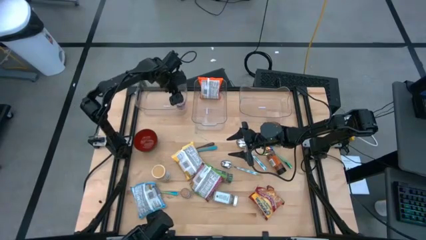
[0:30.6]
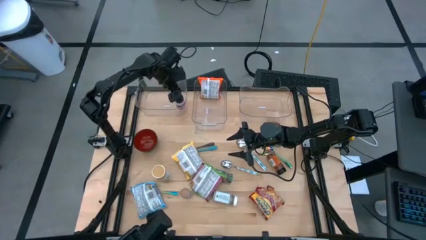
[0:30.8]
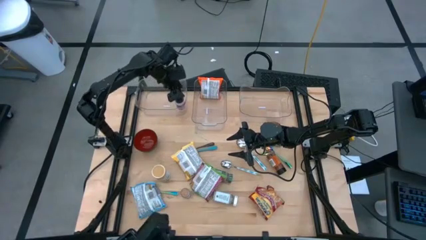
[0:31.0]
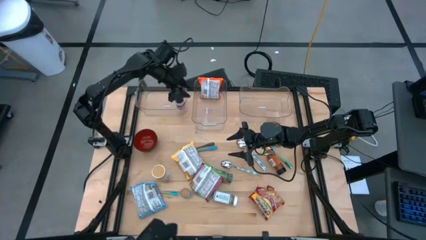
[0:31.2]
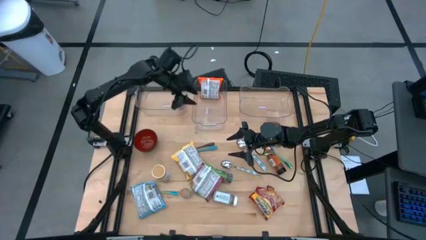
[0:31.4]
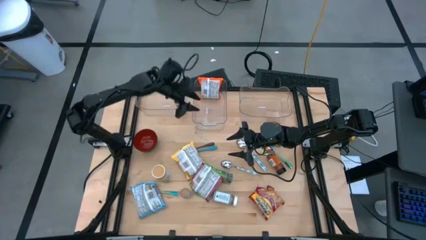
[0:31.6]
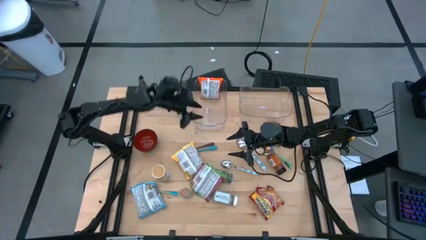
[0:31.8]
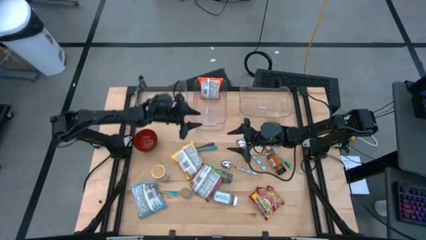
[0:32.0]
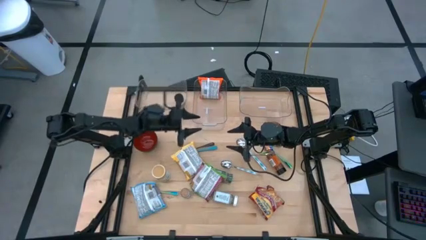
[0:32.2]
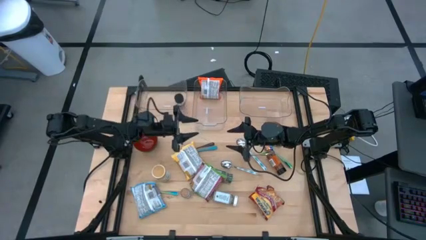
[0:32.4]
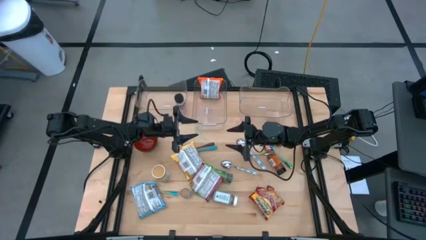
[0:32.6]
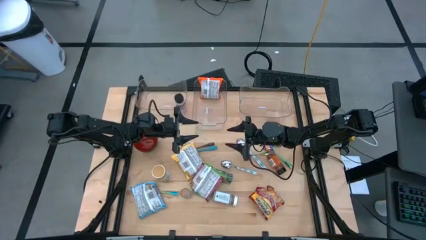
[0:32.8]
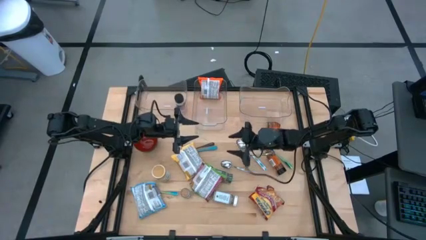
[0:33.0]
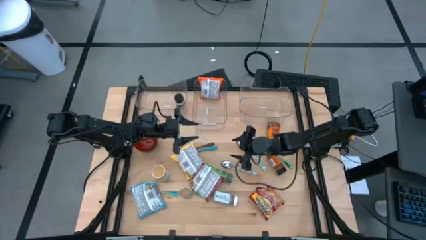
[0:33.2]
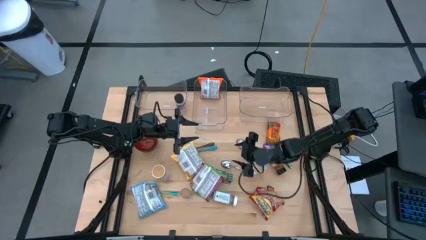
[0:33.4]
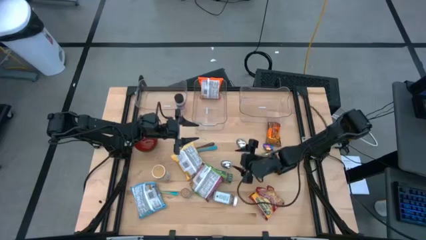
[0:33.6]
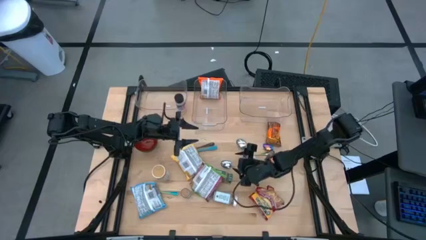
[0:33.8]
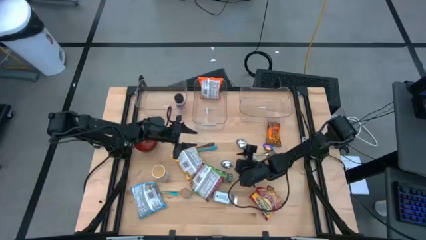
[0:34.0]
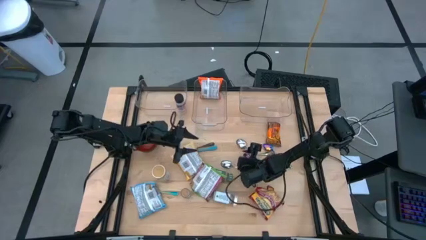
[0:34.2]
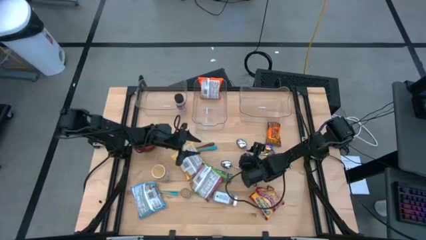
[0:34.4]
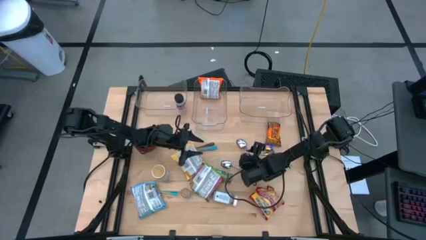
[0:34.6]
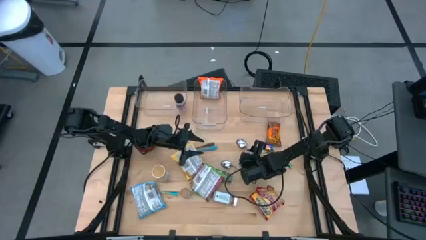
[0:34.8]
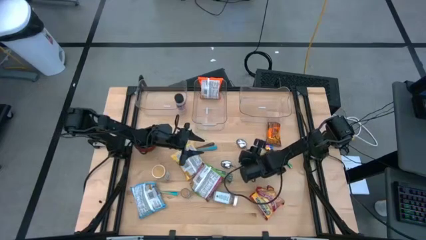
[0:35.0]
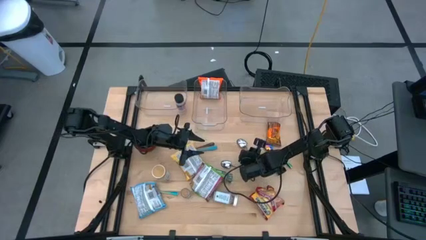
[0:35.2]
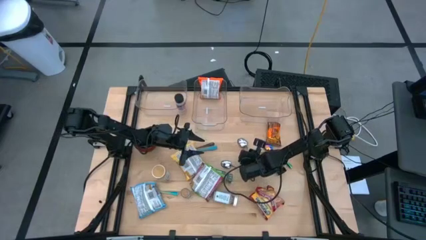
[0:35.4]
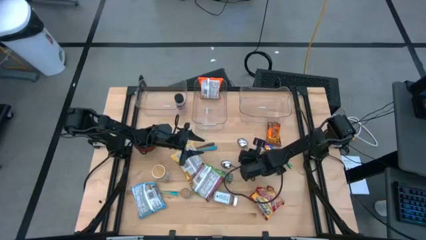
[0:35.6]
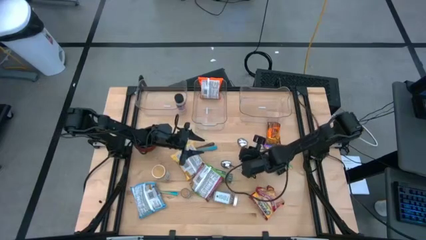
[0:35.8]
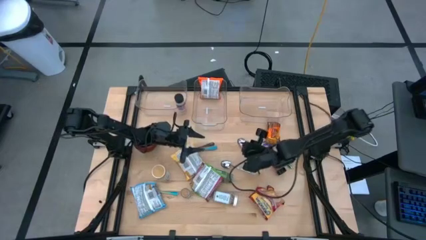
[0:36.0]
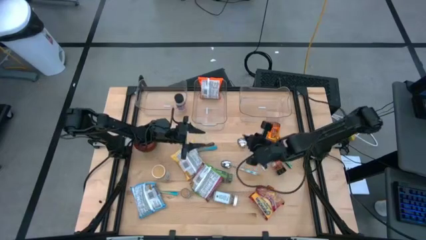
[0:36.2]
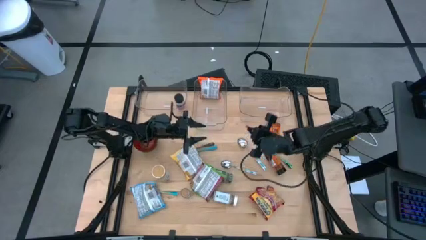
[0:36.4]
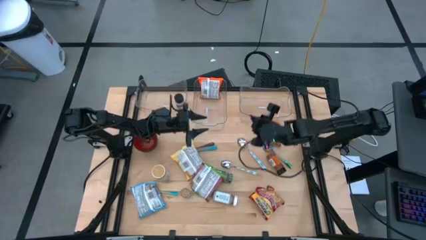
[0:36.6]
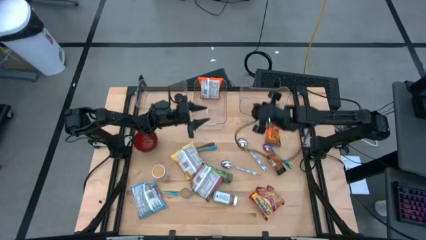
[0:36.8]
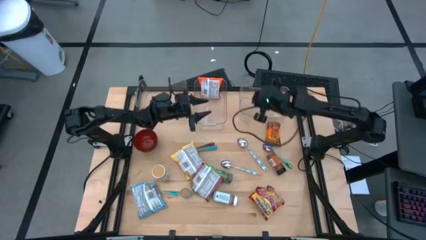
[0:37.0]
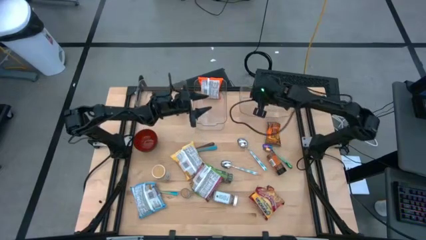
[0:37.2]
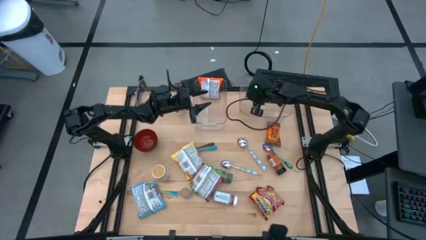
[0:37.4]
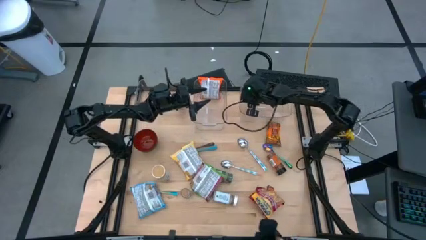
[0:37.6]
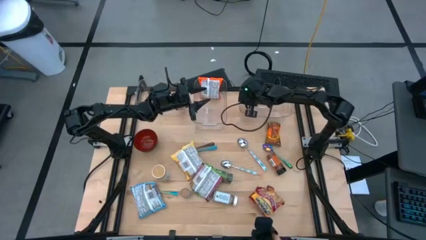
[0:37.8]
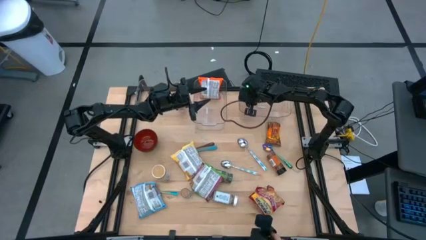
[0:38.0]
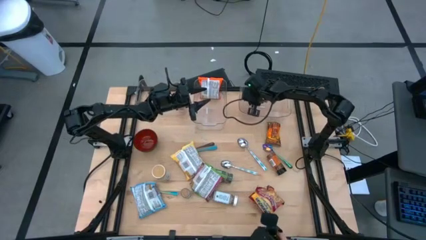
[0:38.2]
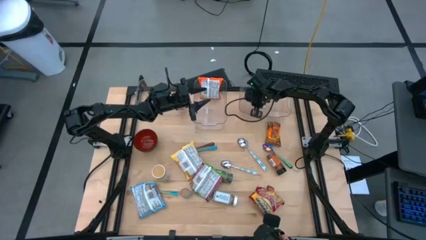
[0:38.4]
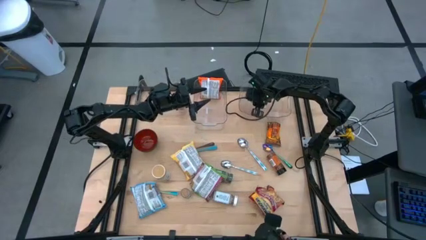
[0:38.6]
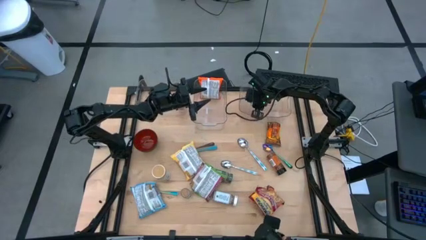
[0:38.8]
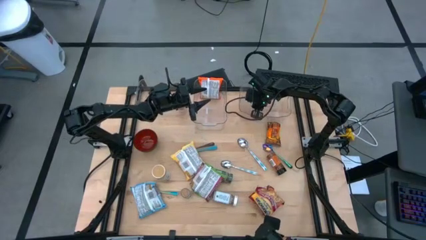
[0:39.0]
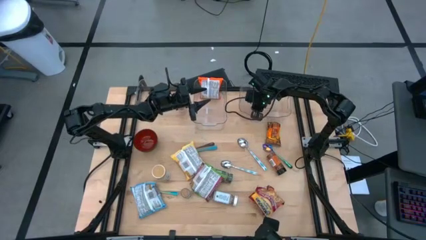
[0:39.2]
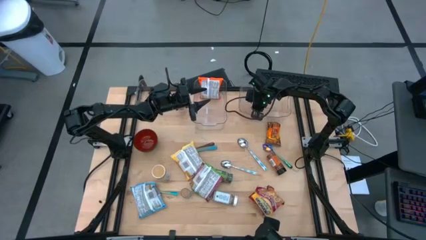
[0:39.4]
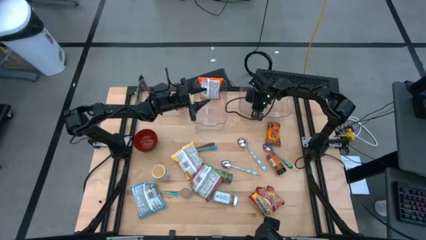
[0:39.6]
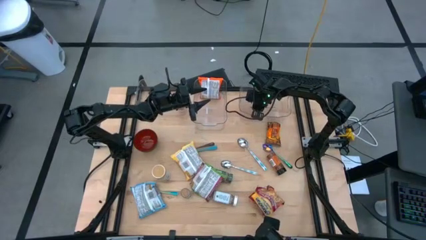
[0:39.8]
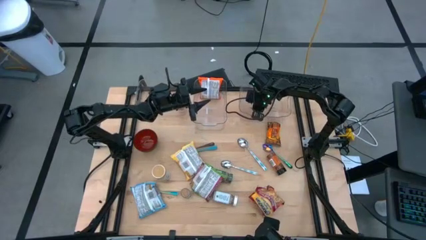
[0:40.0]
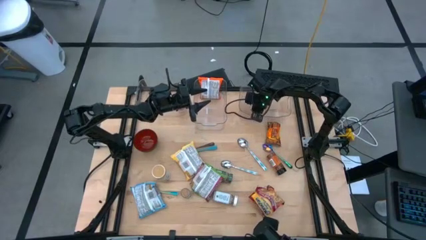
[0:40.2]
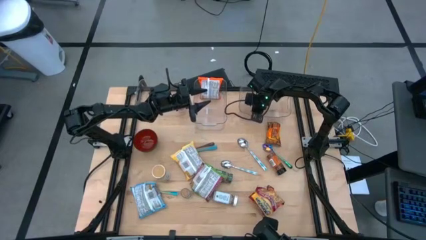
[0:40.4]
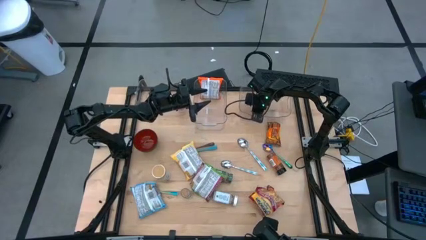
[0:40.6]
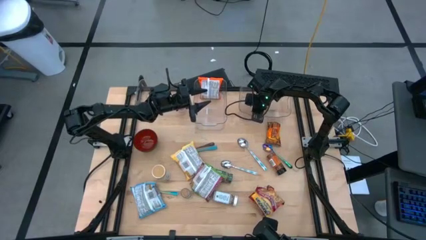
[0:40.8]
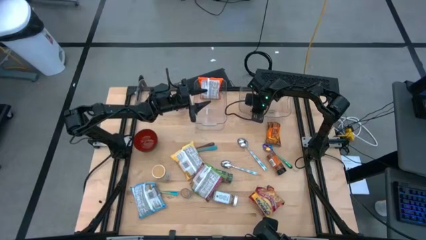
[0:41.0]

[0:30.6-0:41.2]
Task: Pick & Place Food Item
Put the top left blue spoon into the right transparent bin

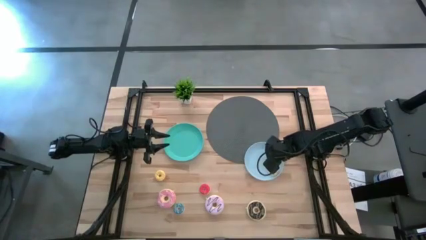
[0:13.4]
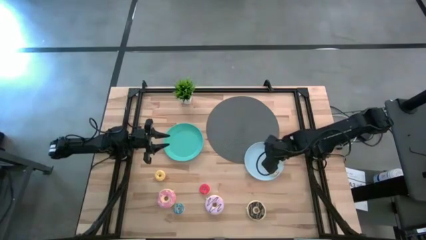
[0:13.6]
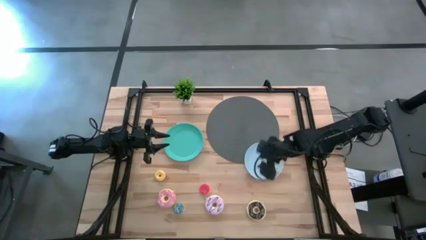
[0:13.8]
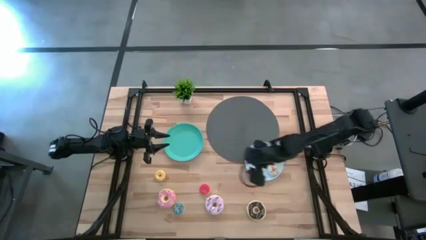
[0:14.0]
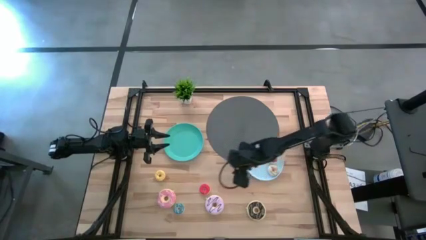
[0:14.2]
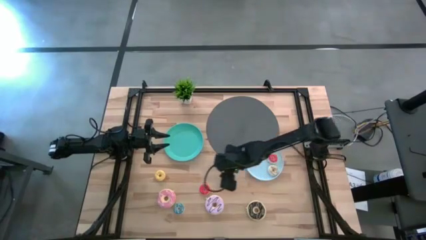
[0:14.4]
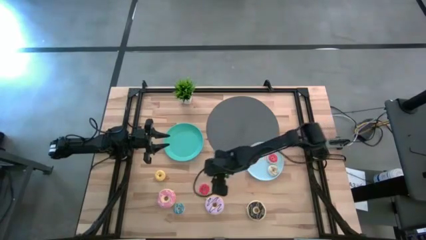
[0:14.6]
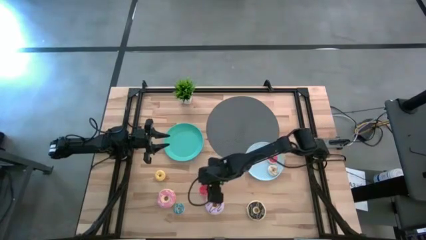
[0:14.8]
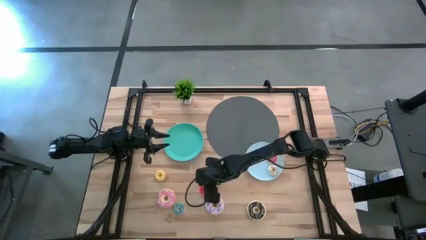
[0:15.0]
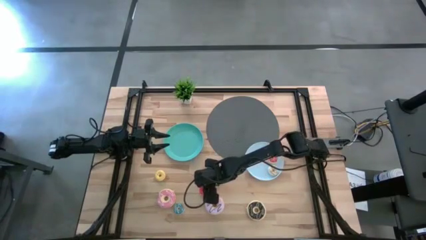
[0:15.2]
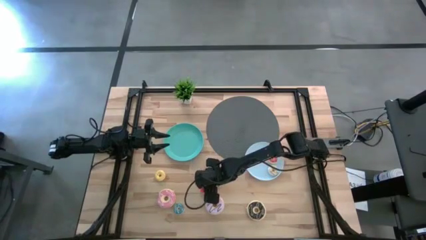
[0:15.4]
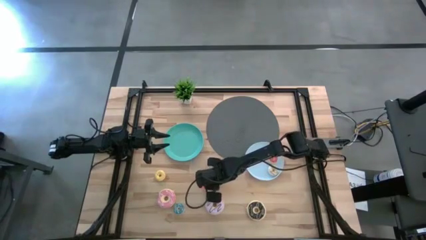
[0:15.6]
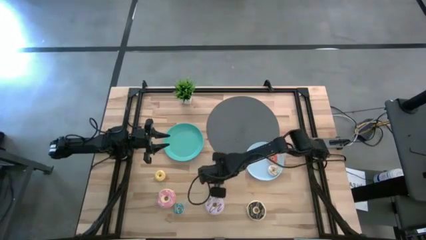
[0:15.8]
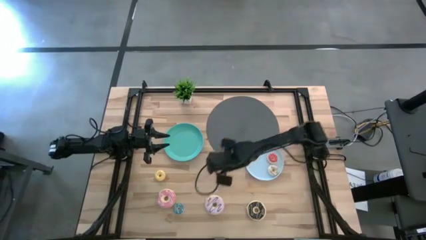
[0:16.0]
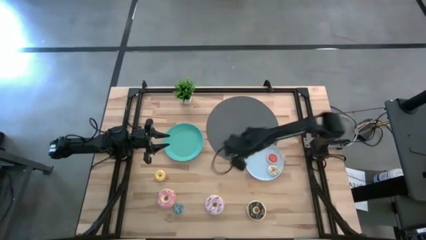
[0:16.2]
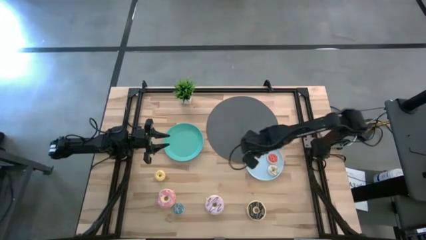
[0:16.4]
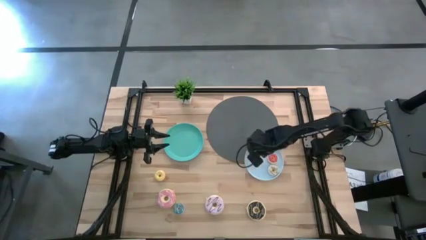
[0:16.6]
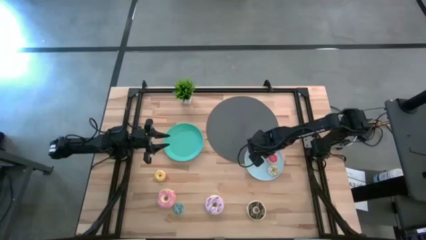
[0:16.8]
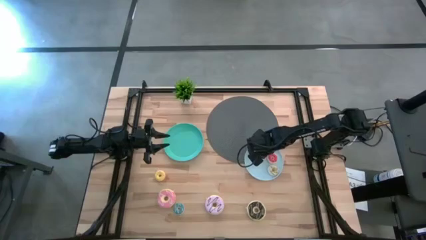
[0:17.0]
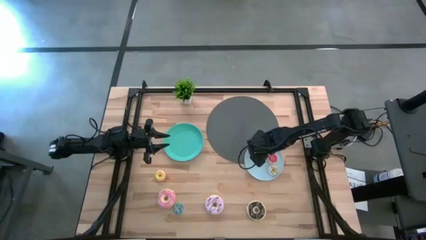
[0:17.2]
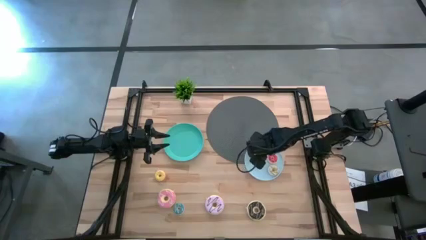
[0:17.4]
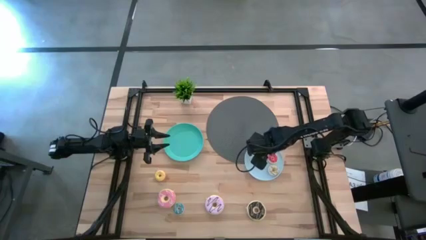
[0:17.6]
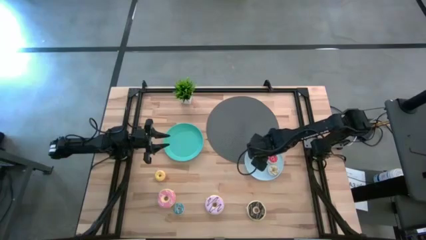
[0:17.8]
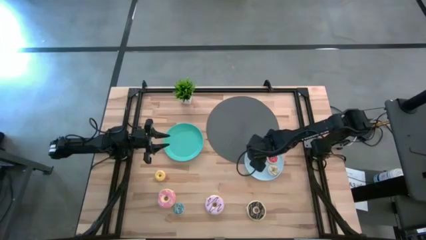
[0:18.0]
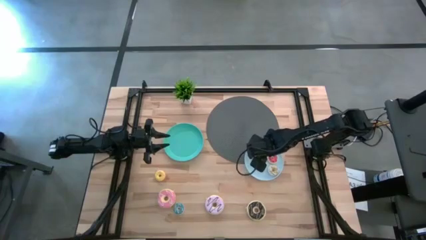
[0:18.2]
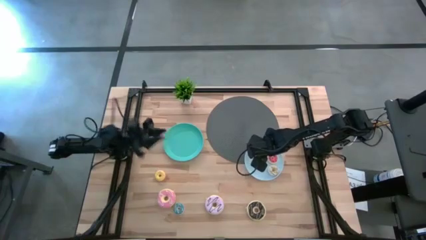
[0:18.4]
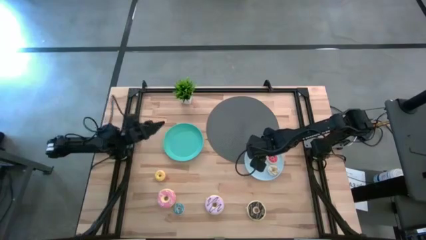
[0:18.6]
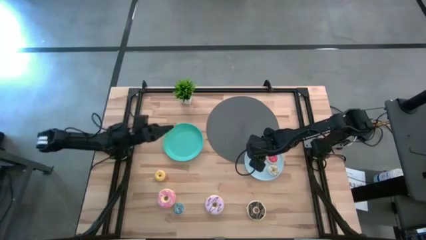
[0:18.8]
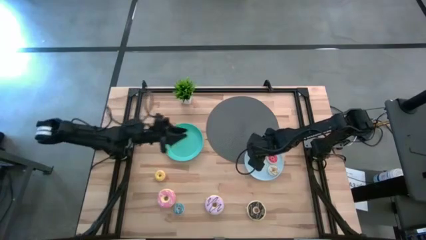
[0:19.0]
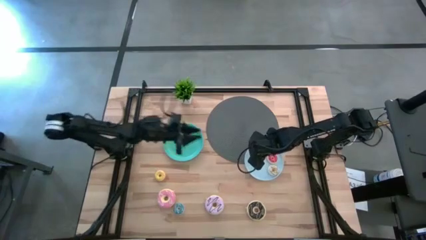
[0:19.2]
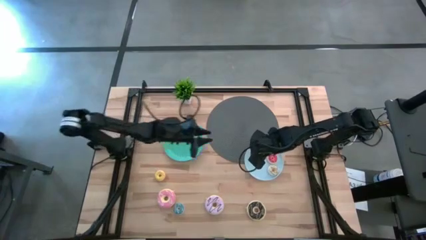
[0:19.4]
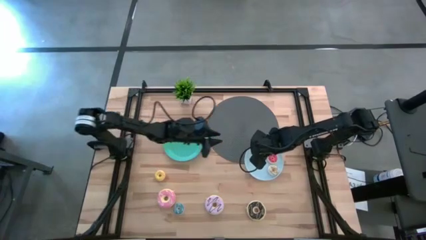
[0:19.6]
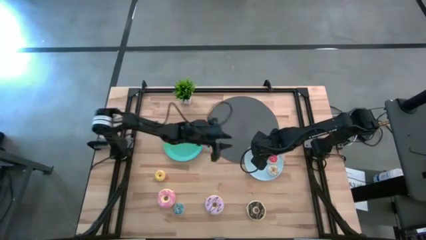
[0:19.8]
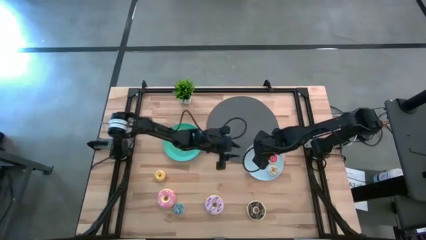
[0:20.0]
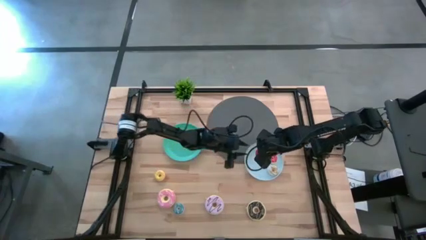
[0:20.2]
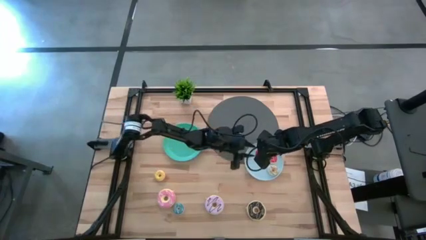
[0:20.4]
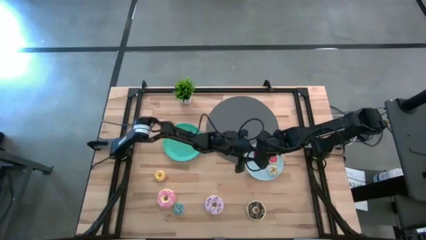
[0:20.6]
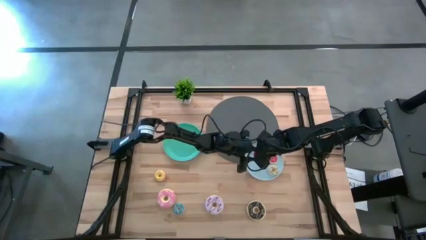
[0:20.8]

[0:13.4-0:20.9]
Task: Pick & Place donuts
Put the small red donut on the blue plate
